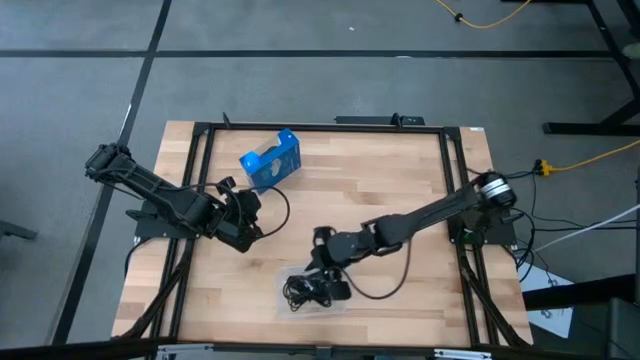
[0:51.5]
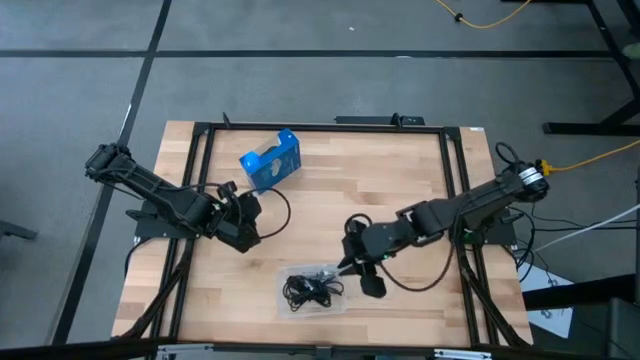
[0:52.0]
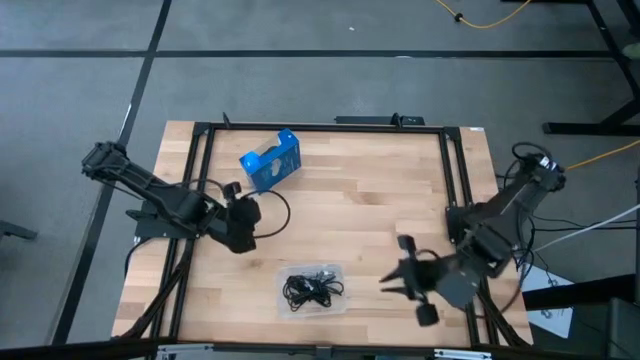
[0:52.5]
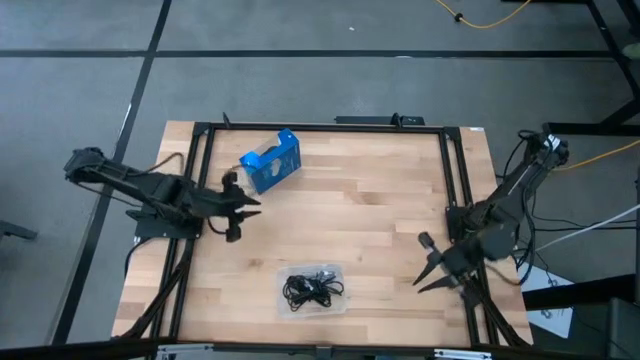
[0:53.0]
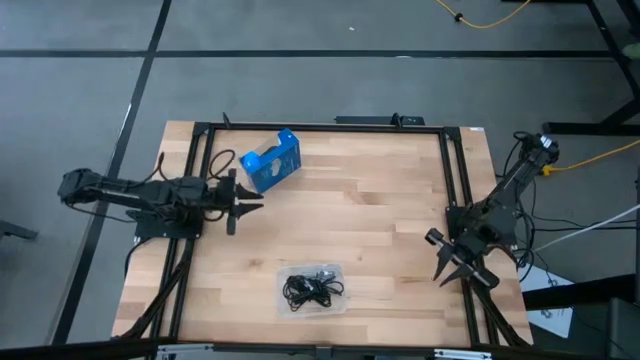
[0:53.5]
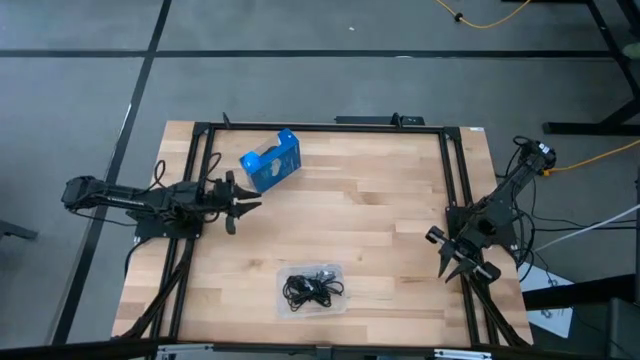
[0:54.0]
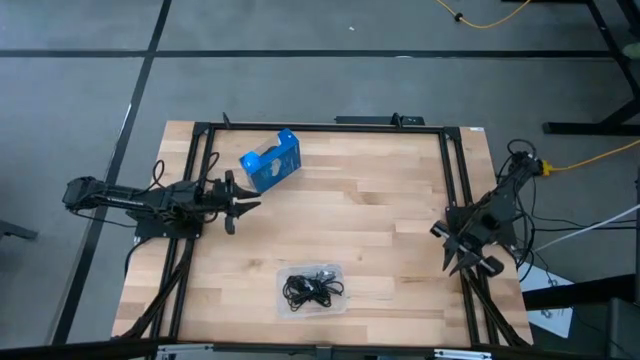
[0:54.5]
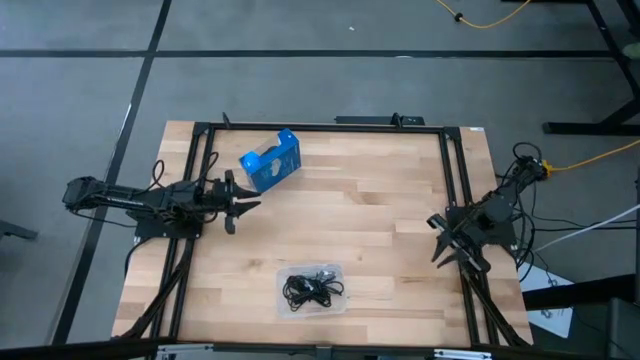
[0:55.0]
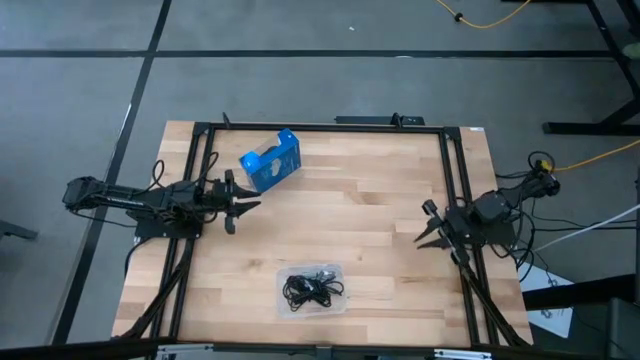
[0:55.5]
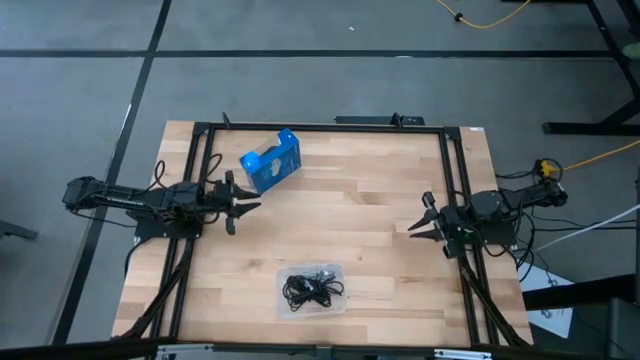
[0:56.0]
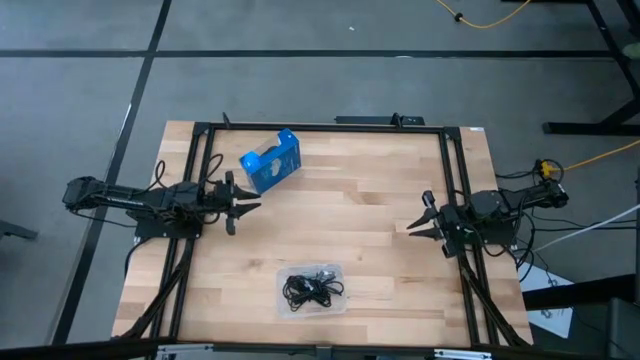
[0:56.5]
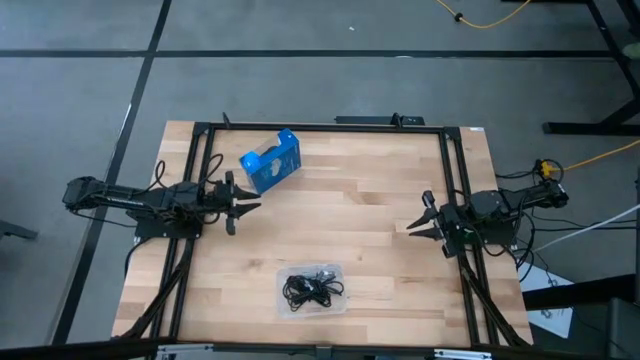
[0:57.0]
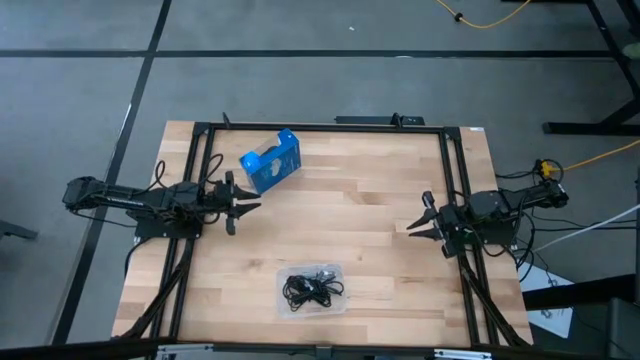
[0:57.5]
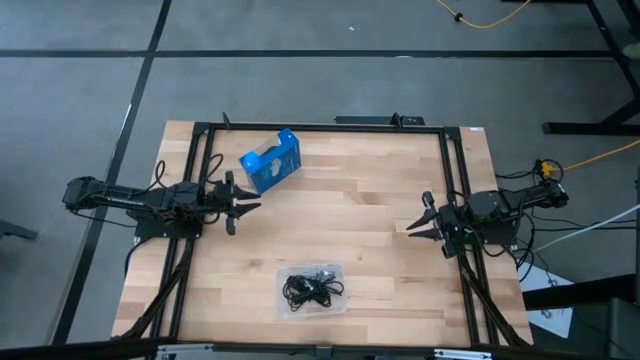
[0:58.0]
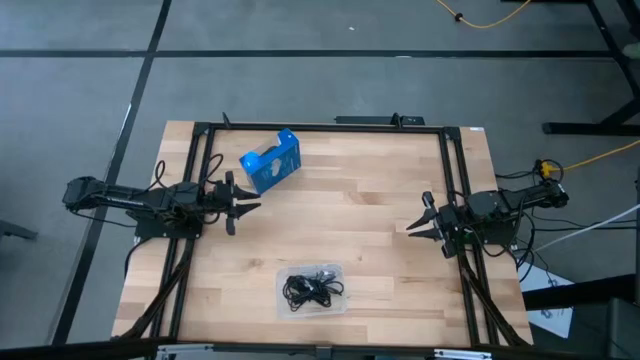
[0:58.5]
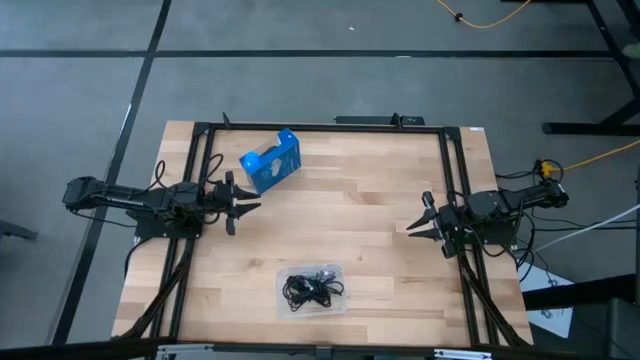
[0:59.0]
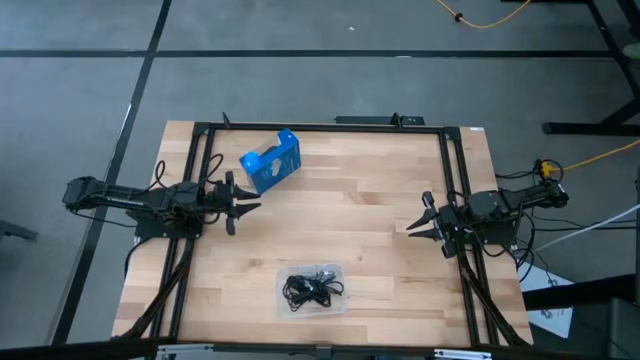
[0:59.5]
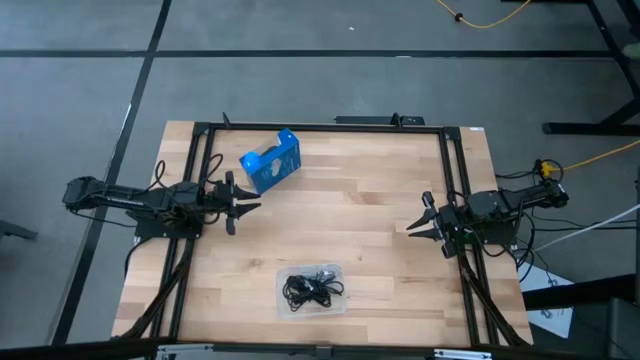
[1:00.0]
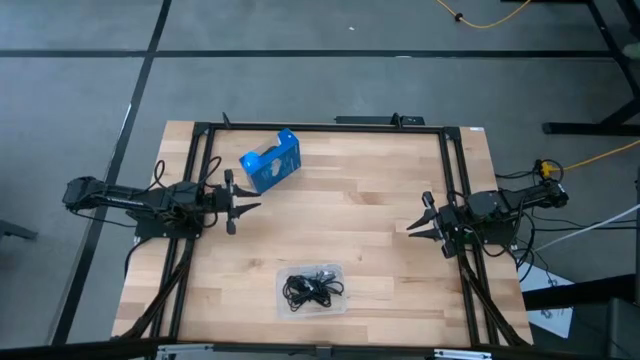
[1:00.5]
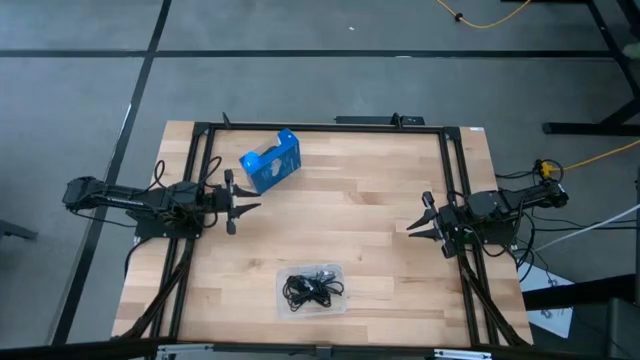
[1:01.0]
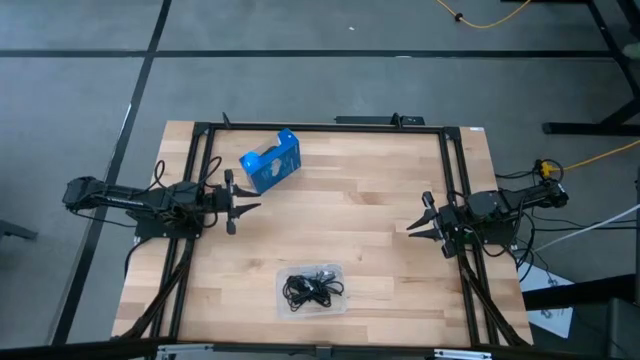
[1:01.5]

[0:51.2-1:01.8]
Task: Pick and place USB-C Cables
Return to Home Position

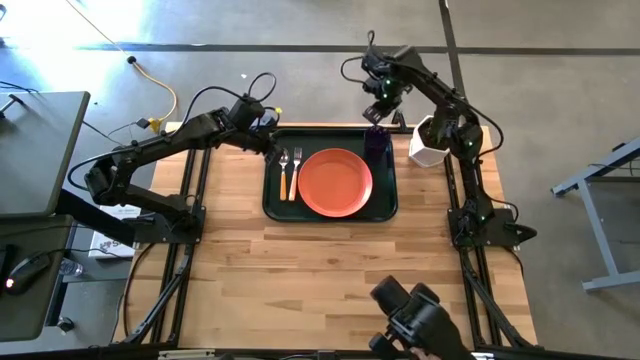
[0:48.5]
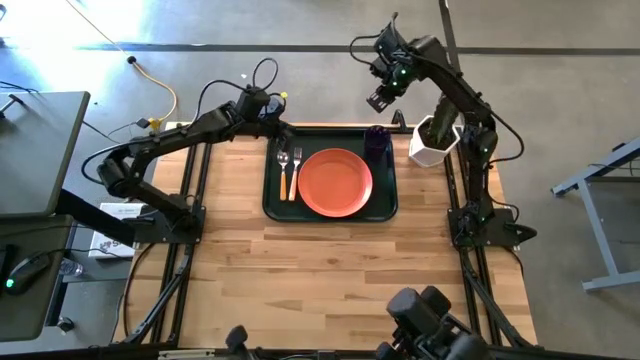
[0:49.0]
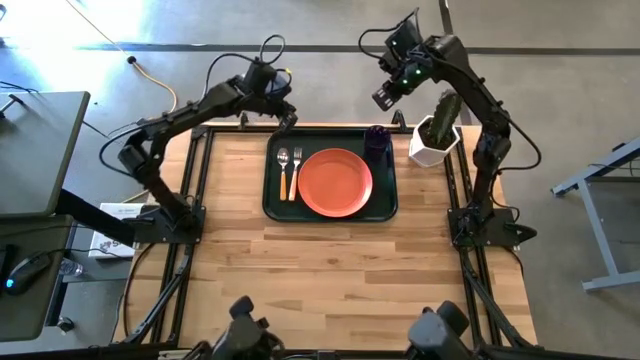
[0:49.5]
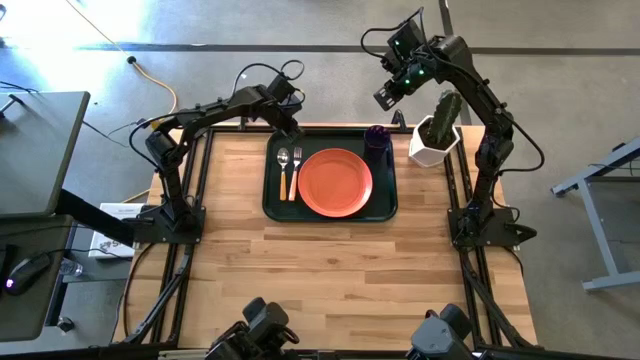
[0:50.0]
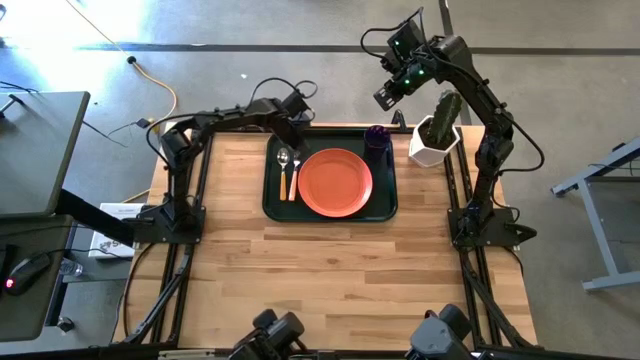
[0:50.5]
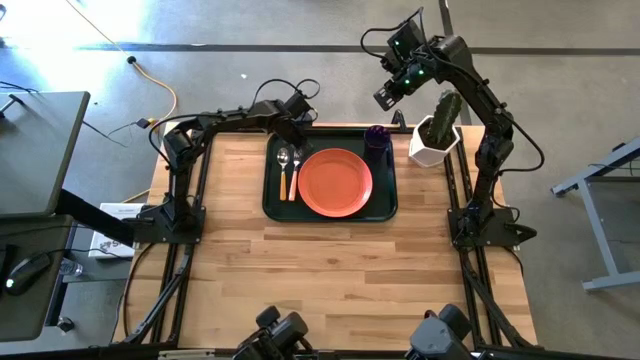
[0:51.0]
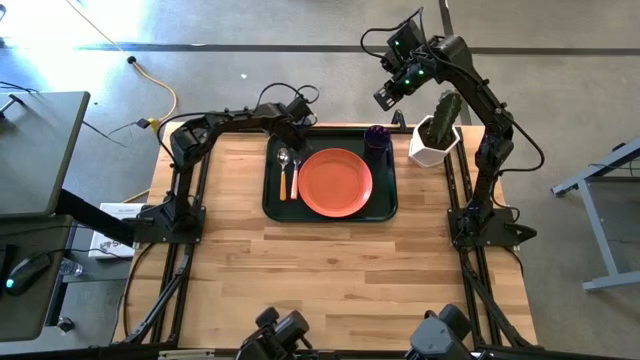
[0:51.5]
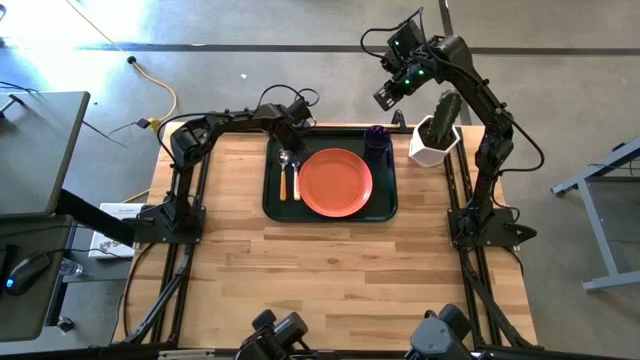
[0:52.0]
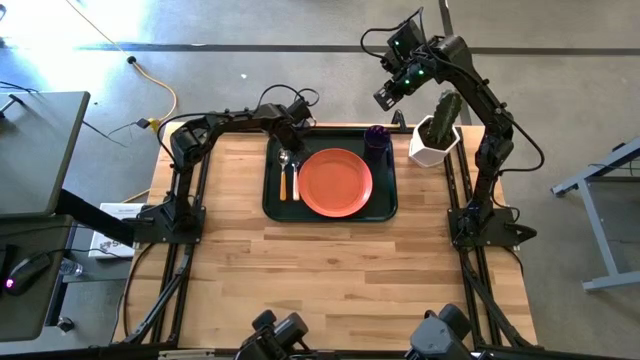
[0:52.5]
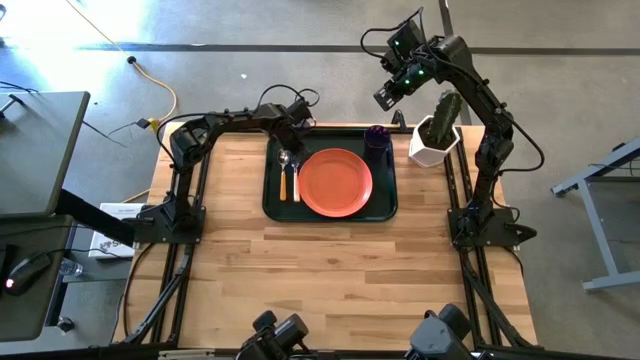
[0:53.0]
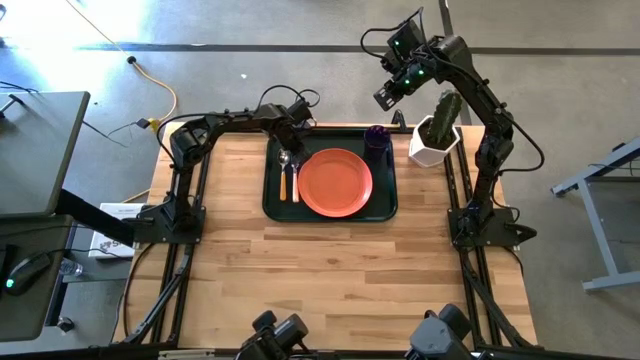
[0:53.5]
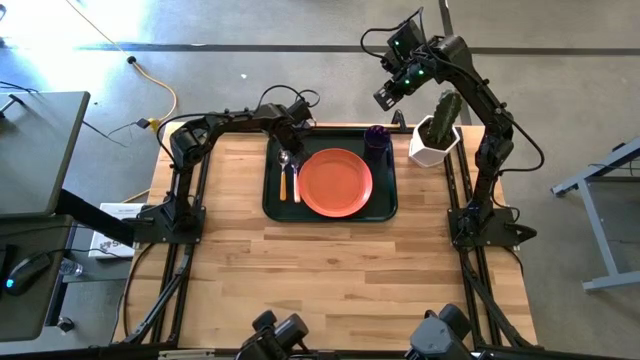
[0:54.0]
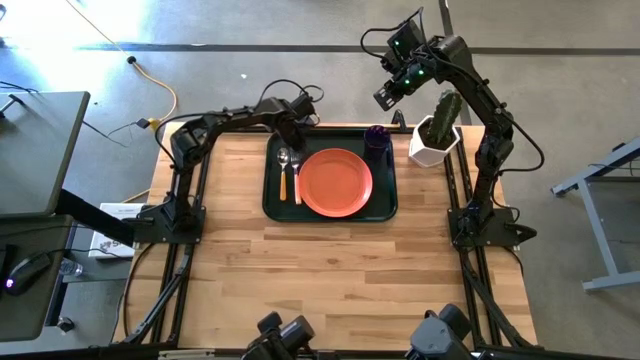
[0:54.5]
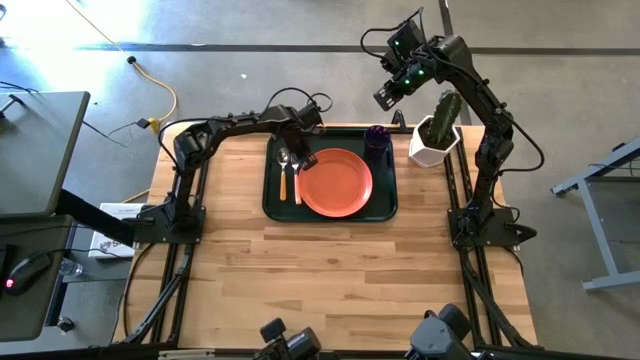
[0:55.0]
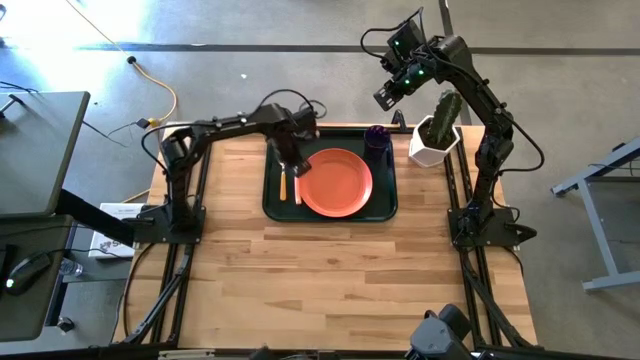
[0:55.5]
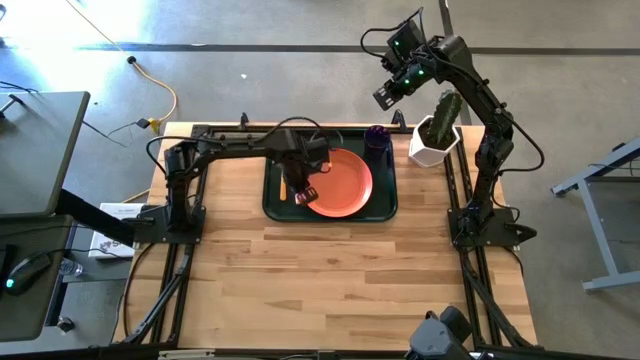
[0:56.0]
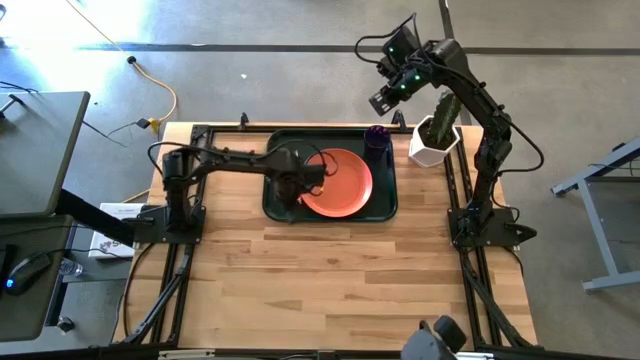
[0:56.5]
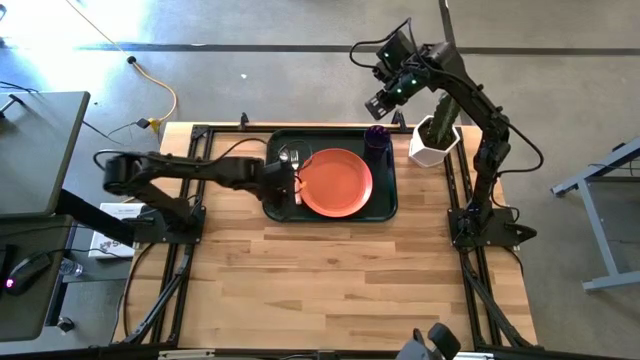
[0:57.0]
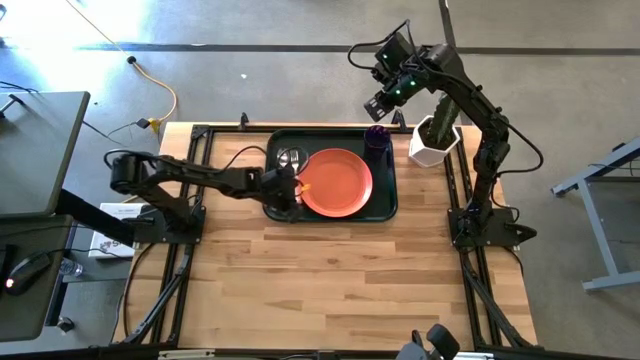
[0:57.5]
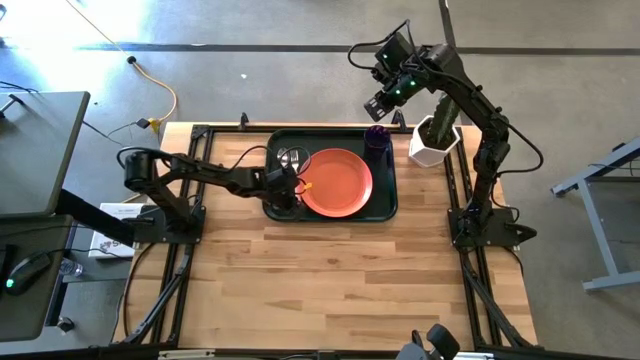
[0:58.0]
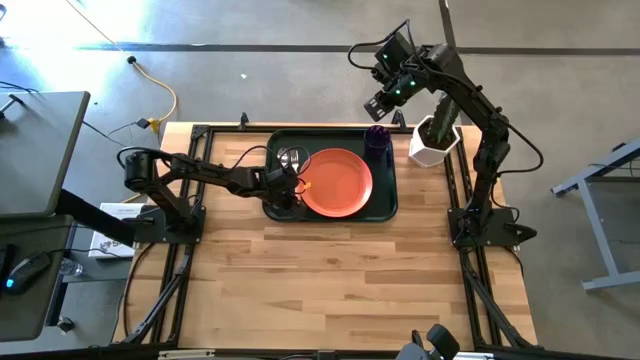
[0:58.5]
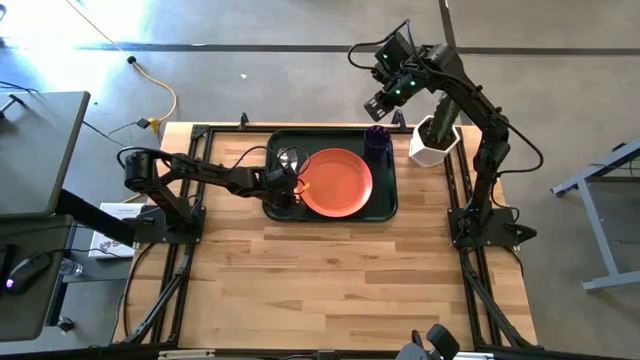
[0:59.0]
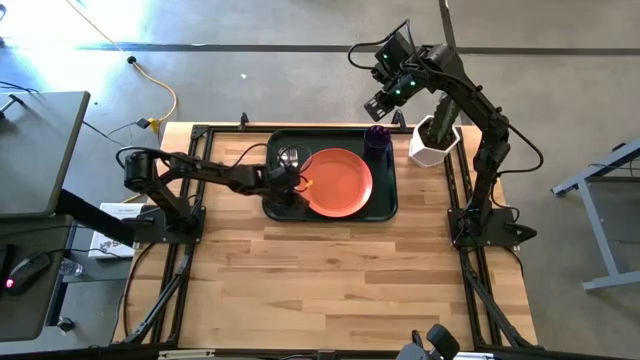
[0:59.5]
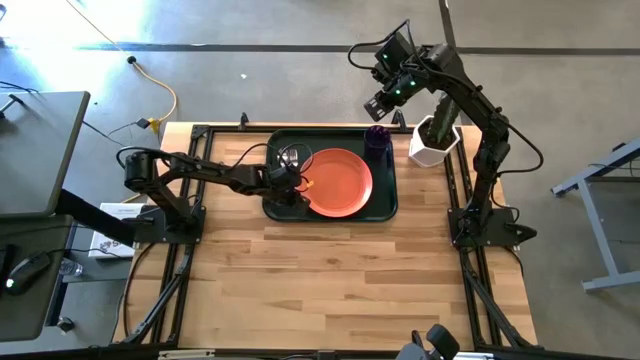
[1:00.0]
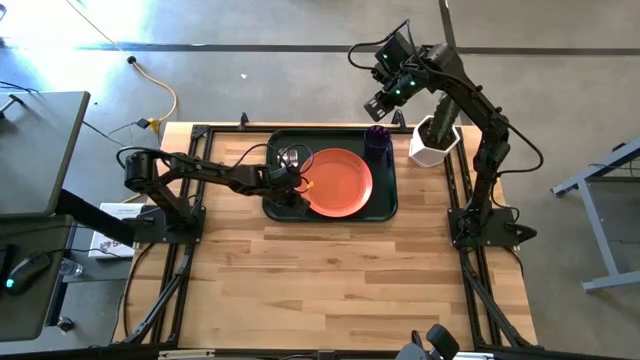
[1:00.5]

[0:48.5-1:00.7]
Task: Pick and place plate/cup/fork/spoon on tray
Adjust the light orange fork
